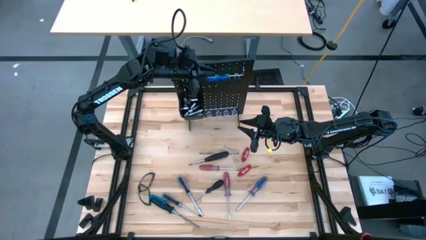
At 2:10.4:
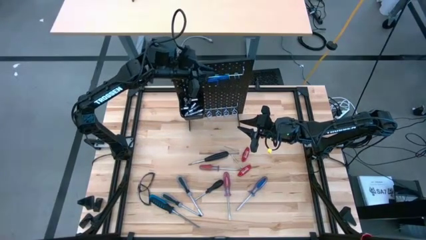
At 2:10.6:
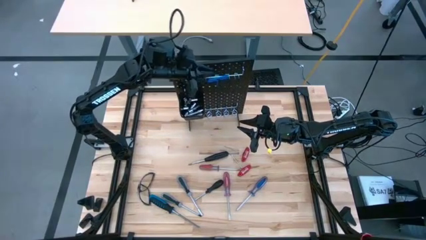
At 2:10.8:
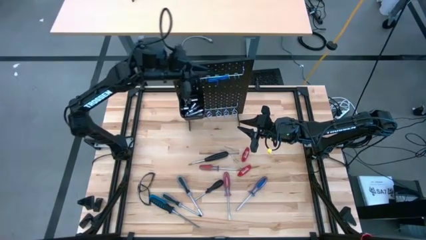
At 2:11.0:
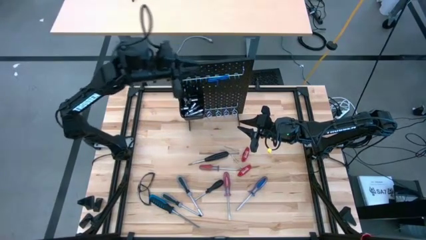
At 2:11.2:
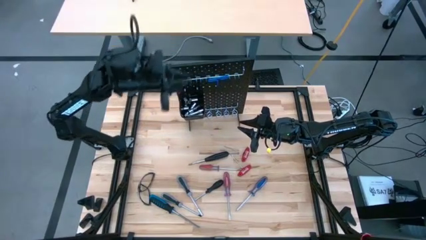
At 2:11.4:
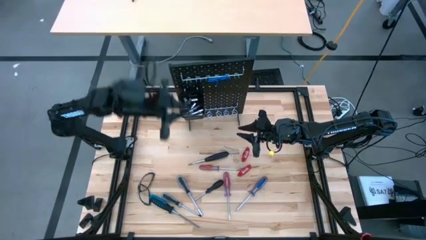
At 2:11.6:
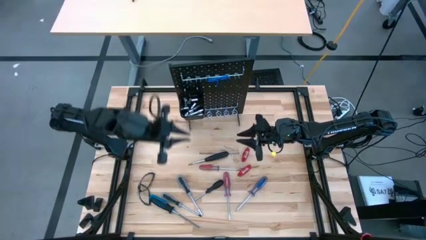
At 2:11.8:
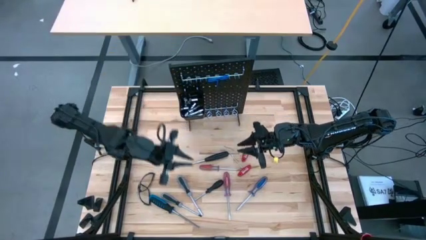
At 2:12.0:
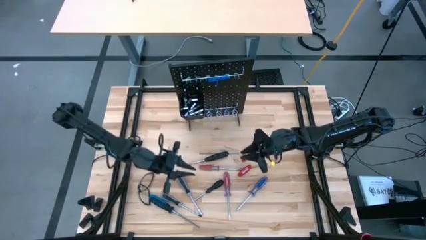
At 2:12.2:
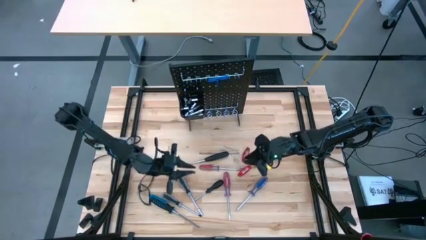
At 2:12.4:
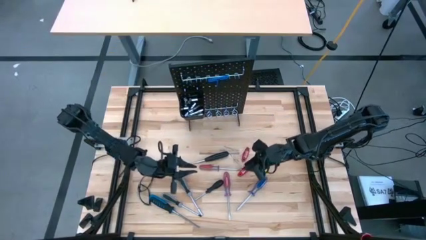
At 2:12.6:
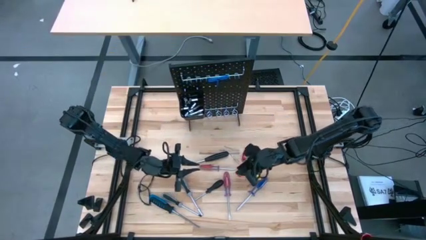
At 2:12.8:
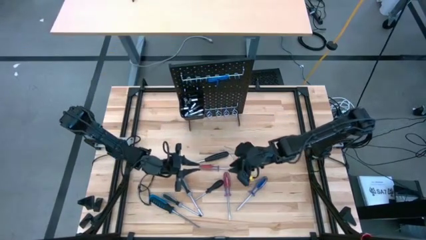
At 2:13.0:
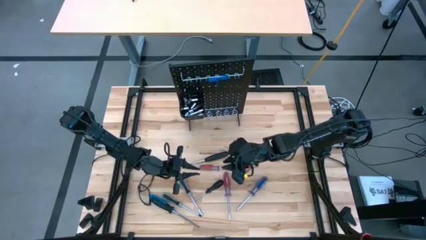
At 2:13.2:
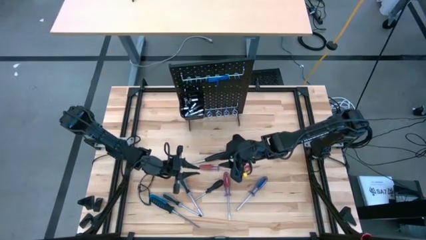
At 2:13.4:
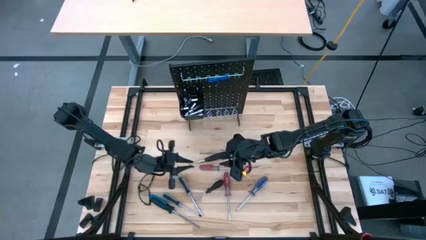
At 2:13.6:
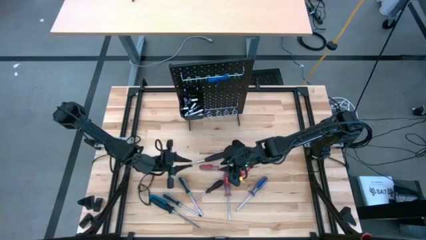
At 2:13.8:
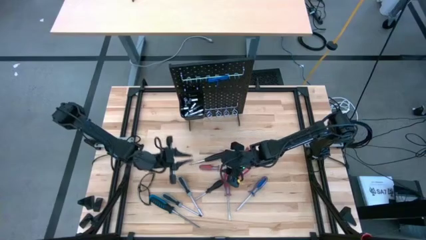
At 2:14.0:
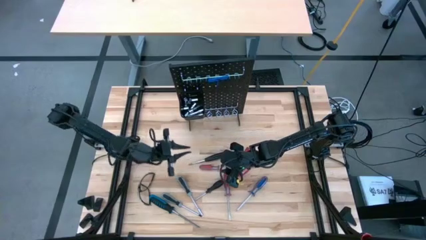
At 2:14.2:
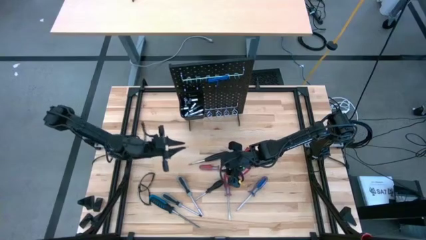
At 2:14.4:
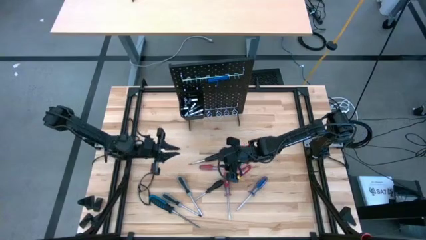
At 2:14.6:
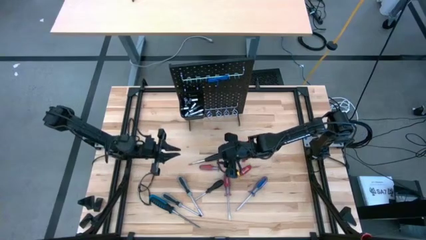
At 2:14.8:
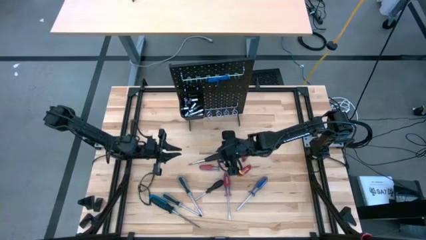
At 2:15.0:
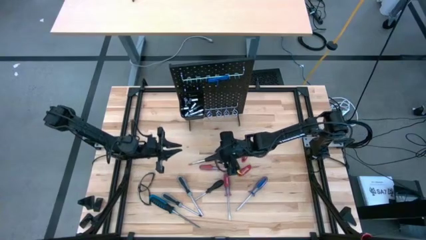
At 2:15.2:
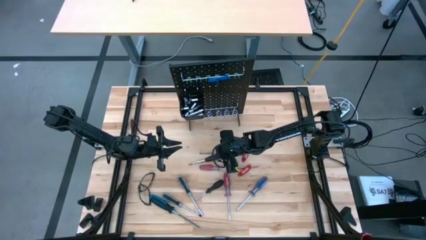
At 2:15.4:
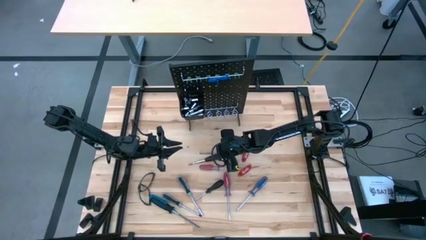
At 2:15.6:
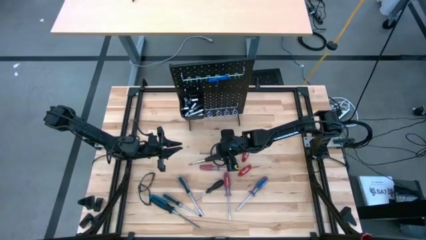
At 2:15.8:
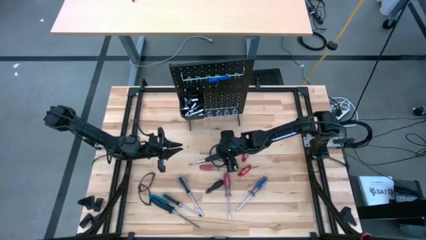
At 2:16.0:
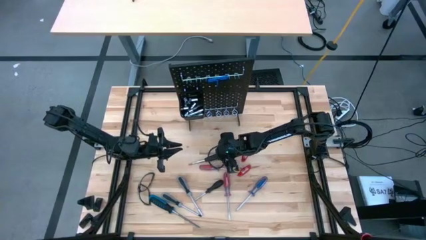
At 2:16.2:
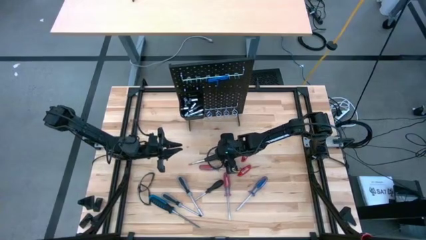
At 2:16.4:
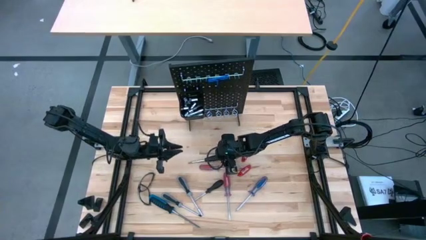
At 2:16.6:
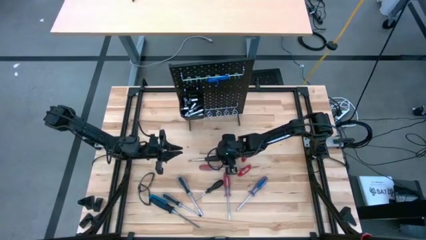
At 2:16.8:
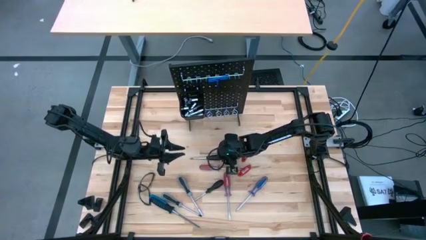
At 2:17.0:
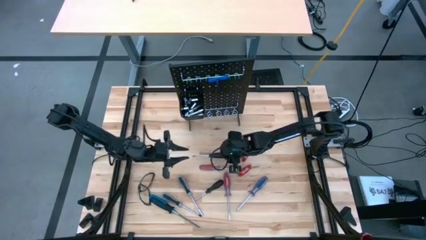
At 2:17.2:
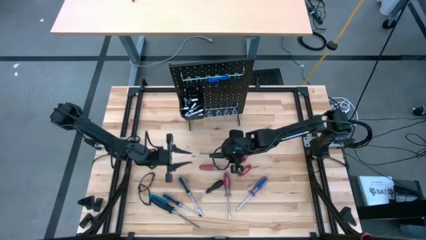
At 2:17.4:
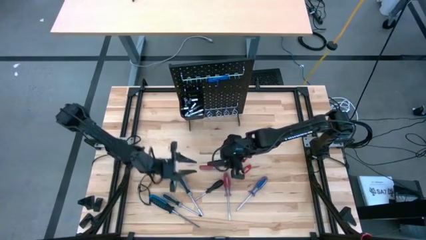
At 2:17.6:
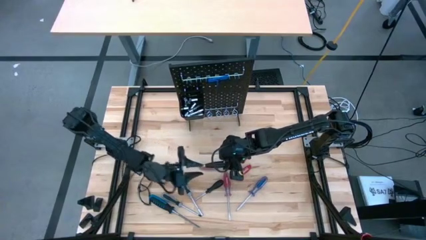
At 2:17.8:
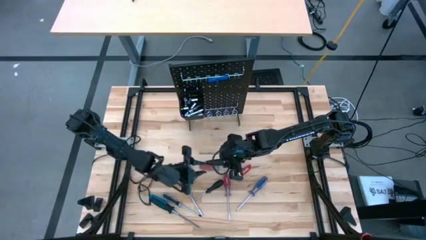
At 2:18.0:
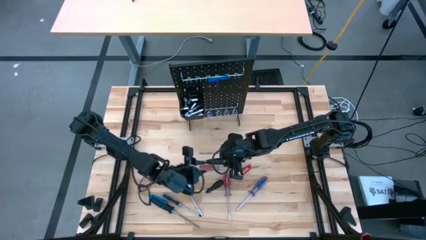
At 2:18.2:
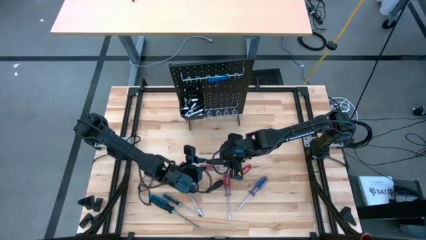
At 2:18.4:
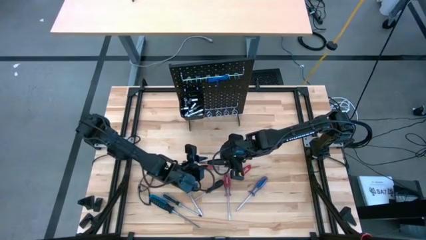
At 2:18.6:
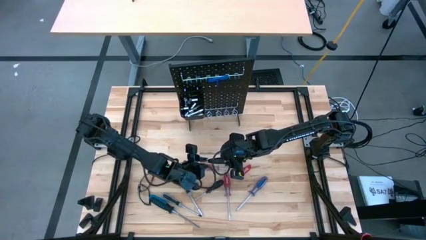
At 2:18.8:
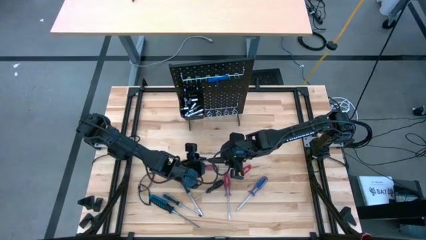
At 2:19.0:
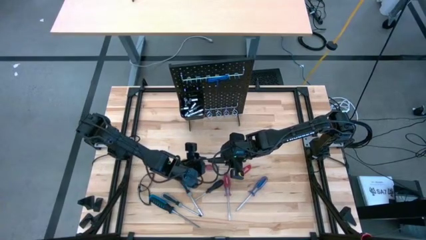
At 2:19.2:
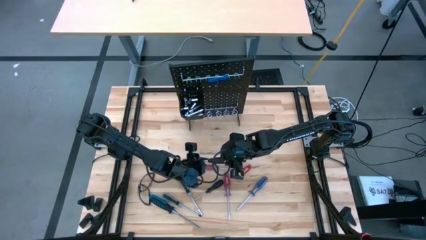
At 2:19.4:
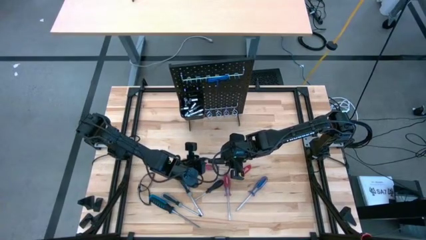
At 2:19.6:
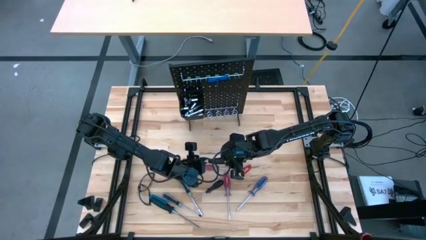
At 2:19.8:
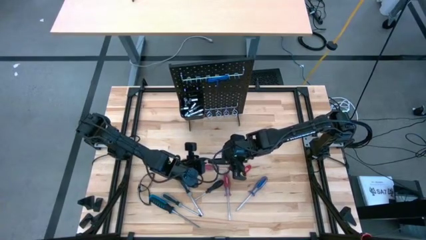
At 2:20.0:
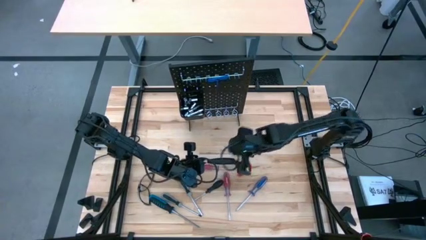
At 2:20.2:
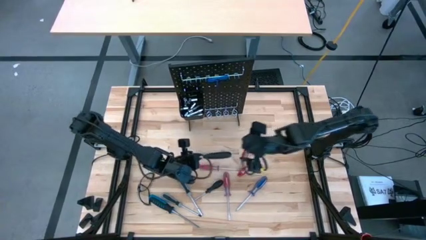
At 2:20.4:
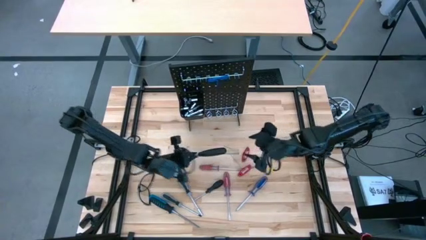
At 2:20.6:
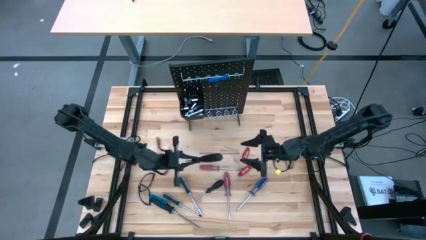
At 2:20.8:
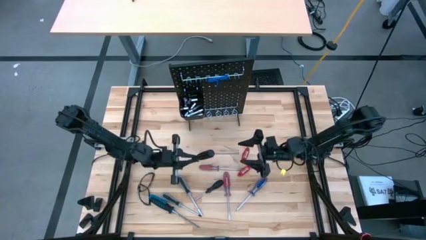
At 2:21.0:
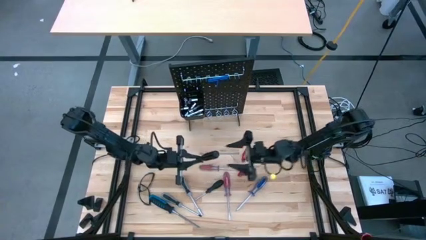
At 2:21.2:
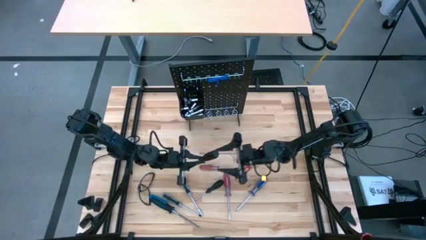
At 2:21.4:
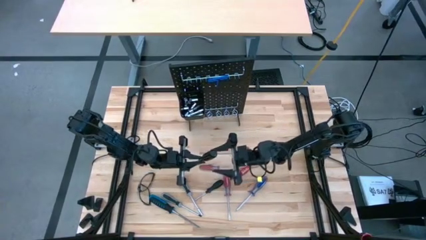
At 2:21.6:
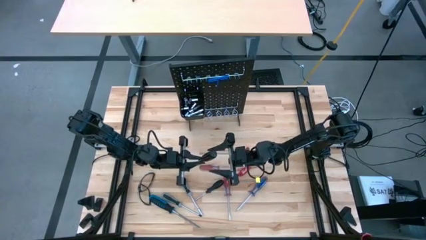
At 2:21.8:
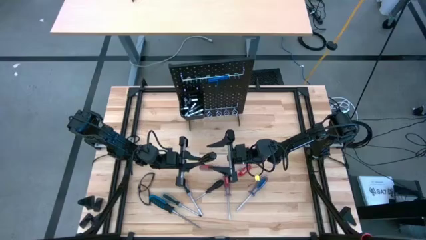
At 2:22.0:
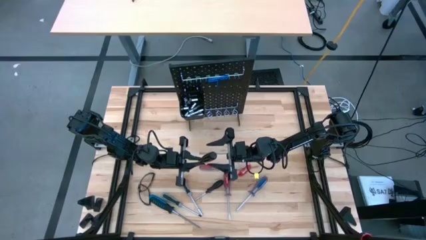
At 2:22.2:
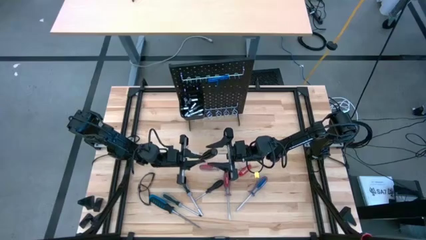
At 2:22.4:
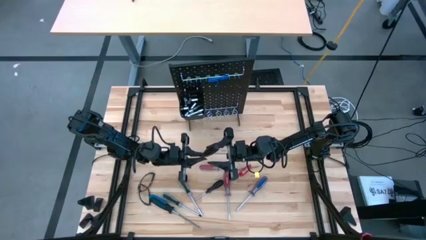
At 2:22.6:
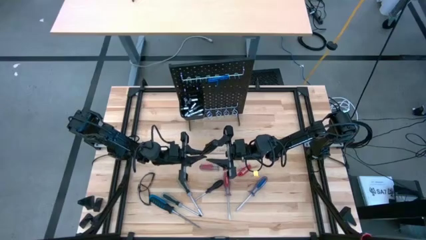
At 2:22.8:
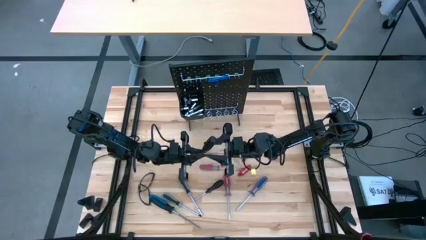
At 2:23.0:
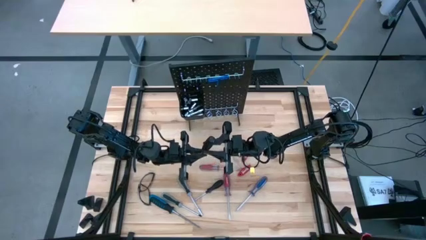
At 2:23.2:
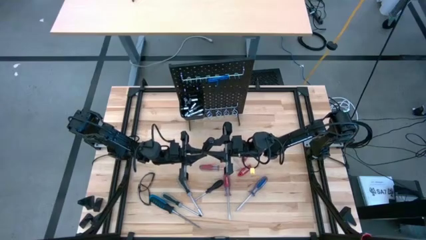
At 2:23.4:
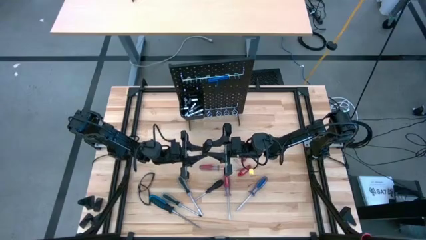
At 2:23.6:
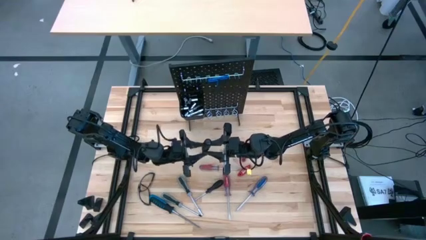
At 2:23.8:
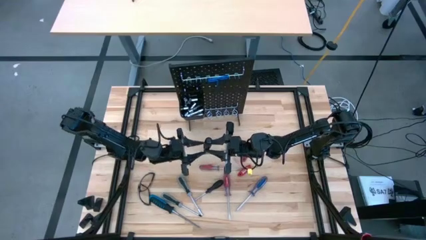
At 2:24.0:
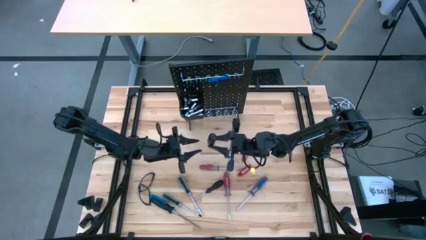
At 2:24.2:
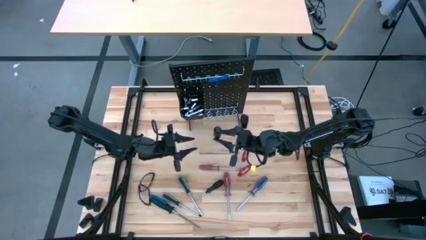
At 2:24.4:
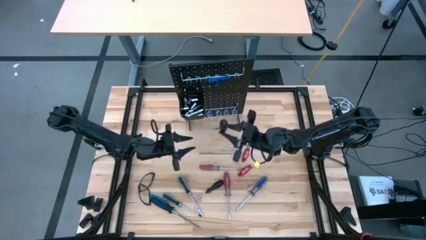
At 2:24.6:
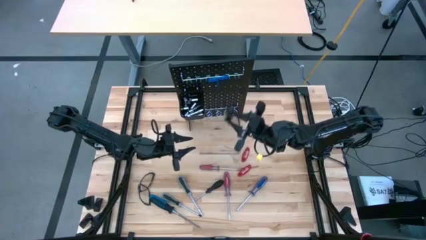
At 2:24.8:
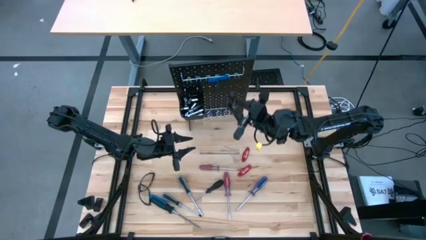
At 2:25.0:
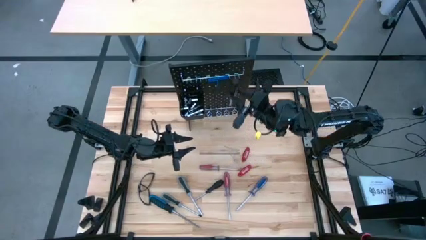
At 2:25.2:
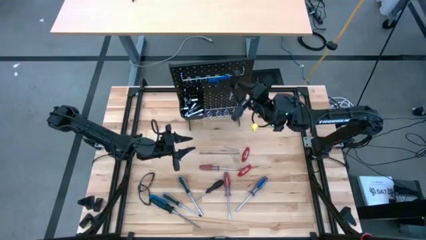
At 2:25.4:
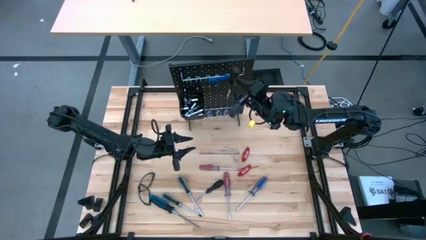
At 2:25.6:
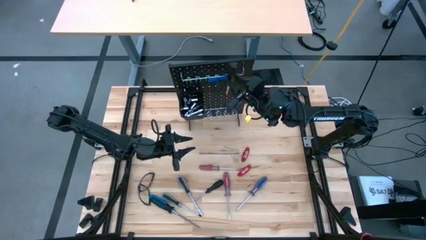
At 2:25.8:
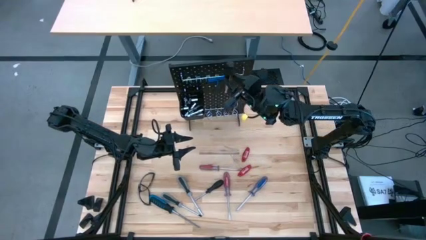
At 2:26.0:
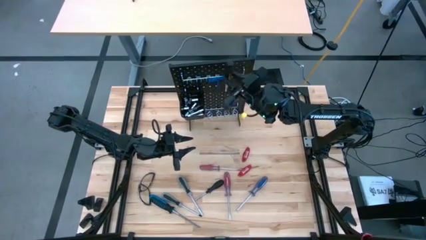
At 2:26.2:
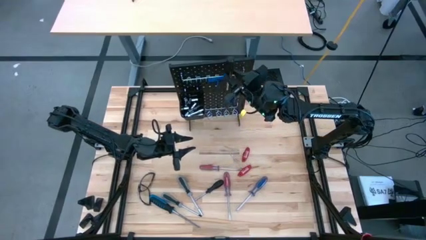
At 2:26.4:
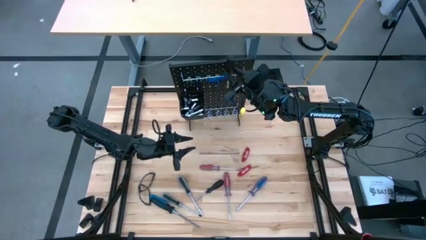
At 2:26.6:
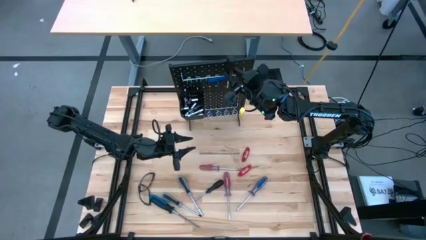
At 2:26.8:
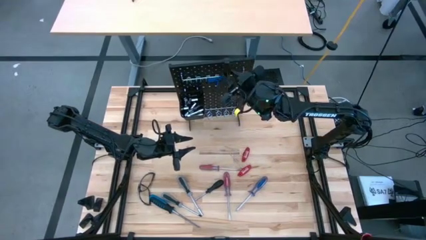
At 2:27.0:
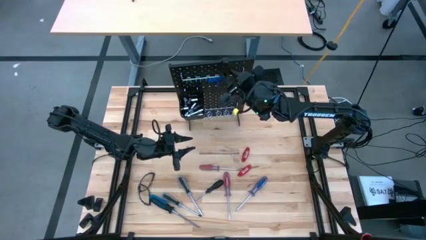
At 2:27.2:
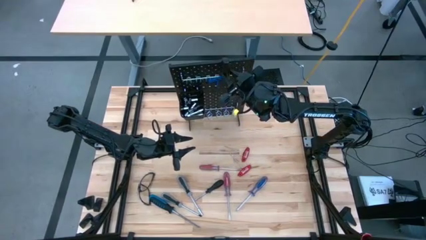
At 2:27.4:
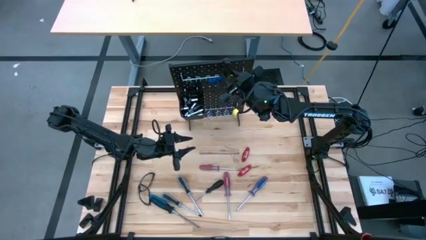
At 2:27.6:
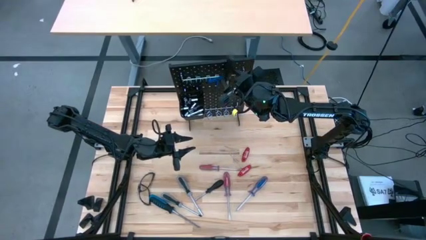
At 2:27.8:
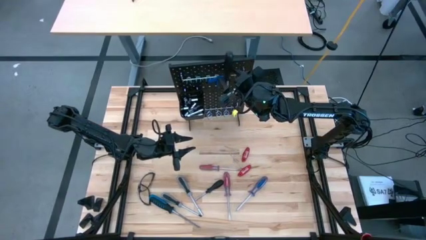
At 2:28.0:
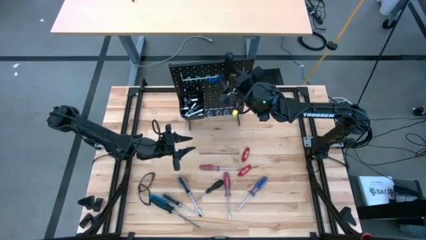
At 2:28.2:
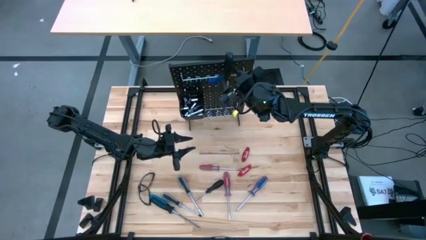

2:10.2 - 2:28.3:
Task: Hang tools onto peg board
Hang the black screwdriver on the pegboard
